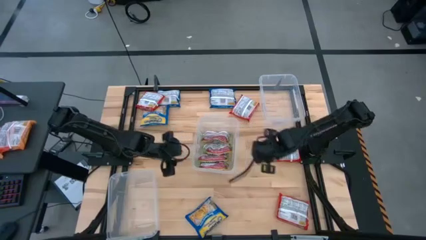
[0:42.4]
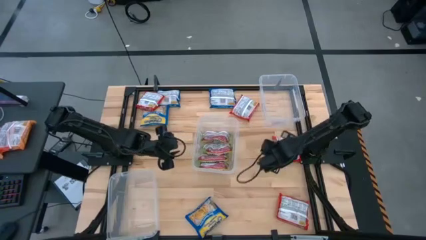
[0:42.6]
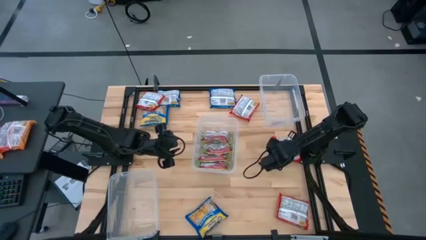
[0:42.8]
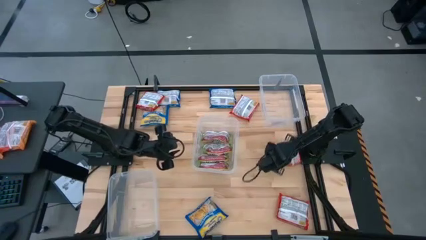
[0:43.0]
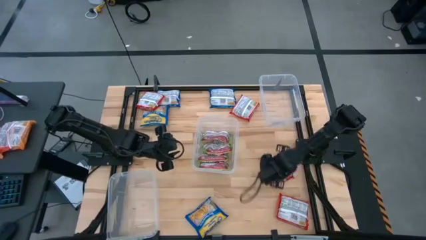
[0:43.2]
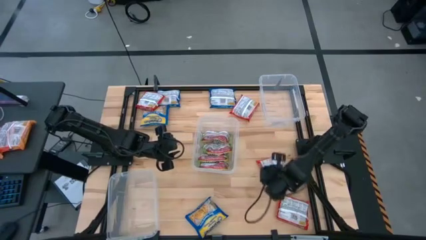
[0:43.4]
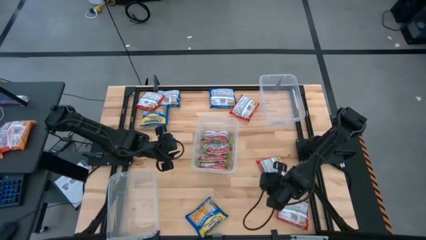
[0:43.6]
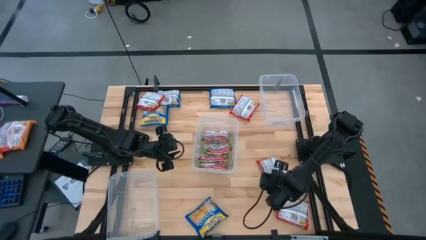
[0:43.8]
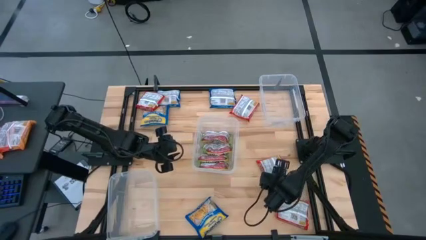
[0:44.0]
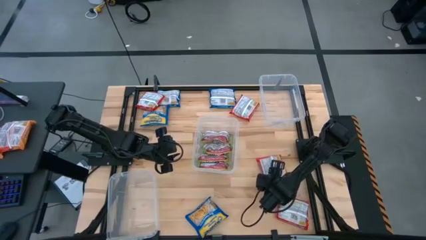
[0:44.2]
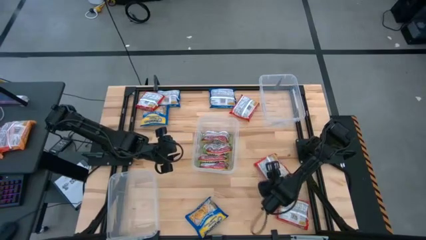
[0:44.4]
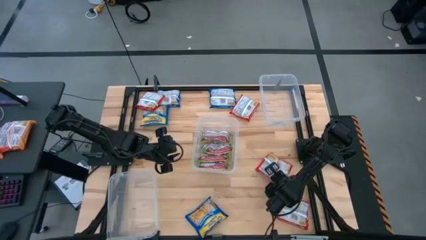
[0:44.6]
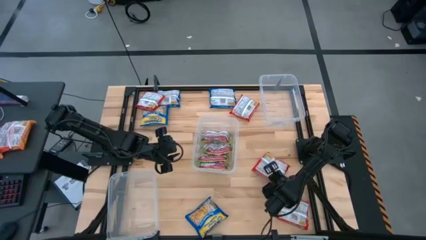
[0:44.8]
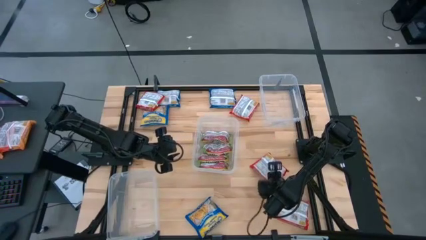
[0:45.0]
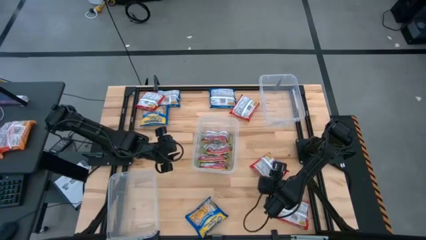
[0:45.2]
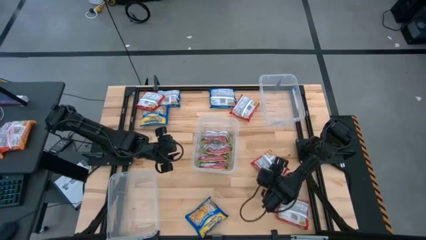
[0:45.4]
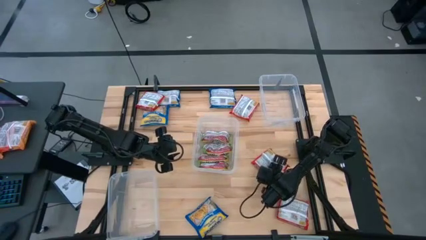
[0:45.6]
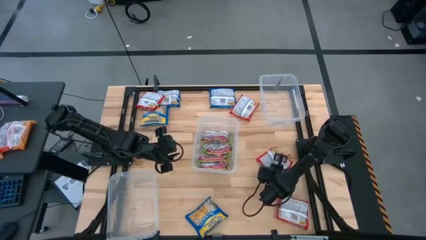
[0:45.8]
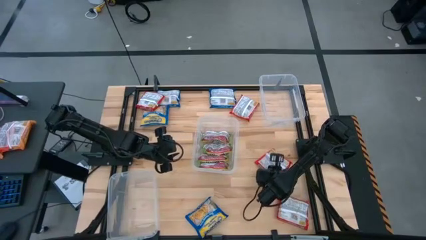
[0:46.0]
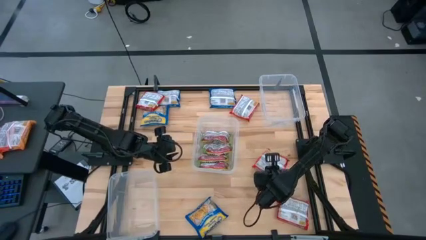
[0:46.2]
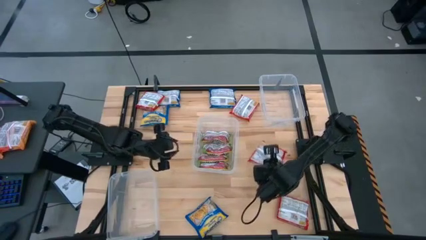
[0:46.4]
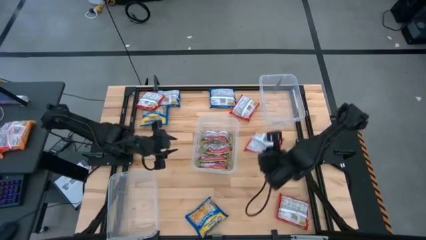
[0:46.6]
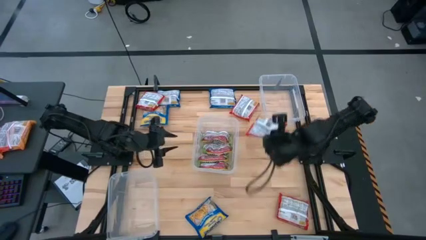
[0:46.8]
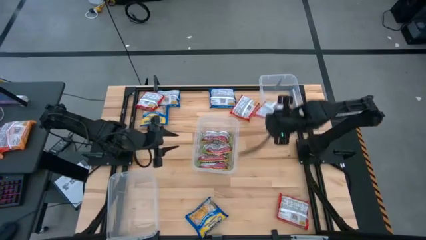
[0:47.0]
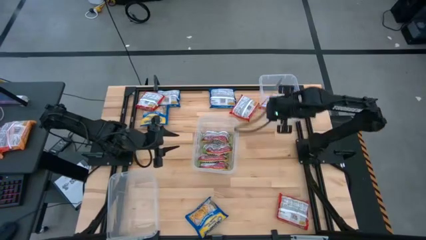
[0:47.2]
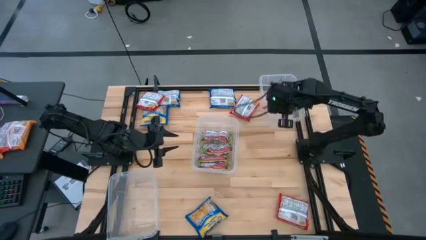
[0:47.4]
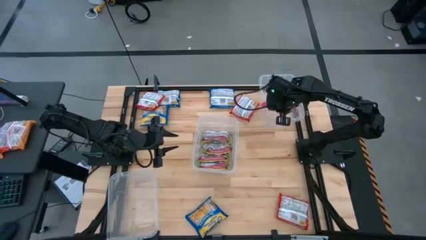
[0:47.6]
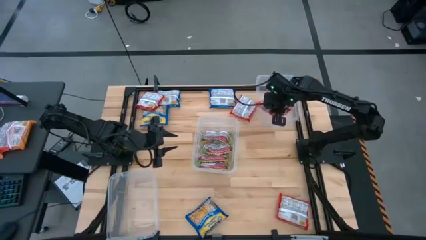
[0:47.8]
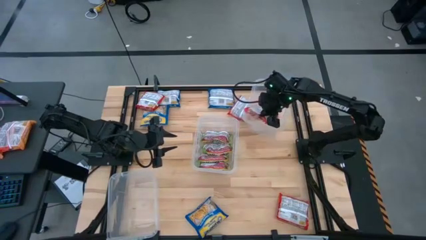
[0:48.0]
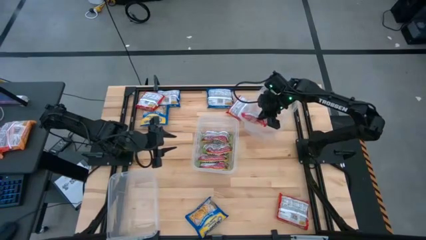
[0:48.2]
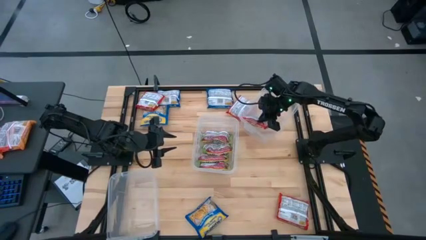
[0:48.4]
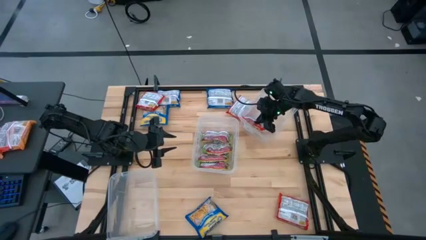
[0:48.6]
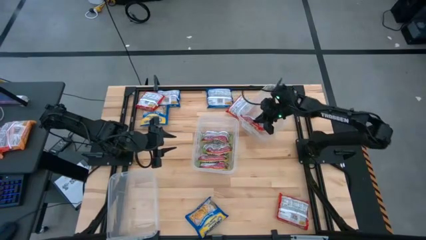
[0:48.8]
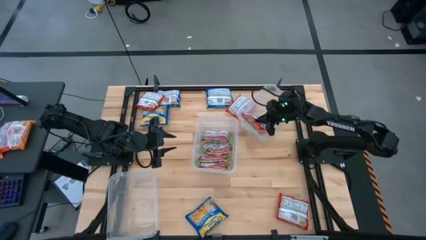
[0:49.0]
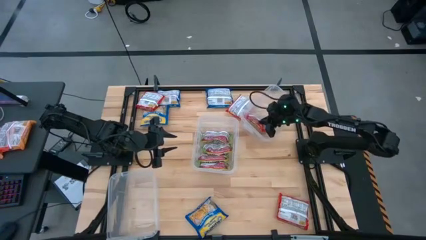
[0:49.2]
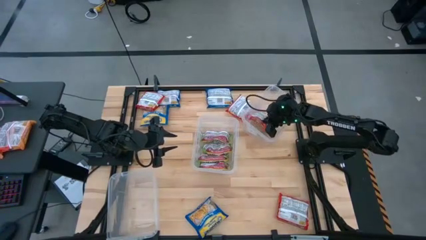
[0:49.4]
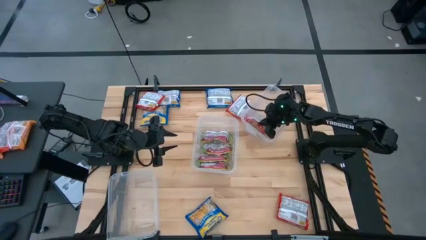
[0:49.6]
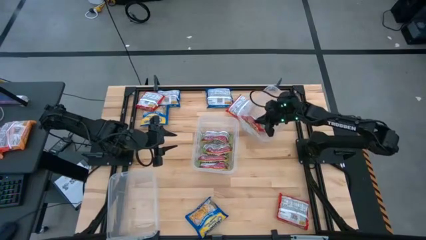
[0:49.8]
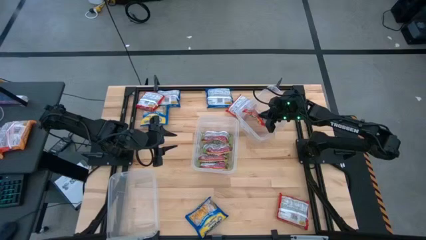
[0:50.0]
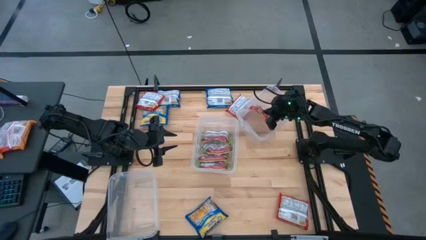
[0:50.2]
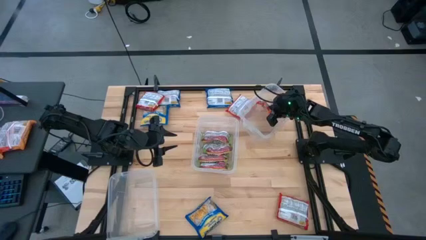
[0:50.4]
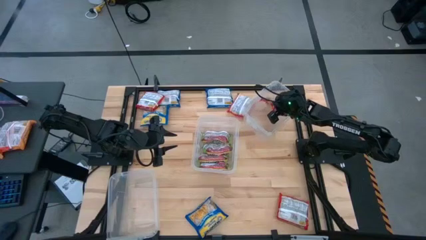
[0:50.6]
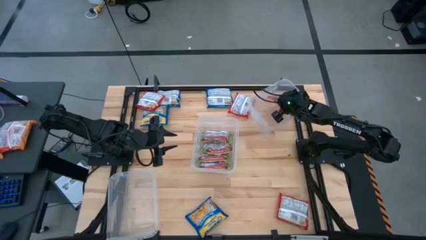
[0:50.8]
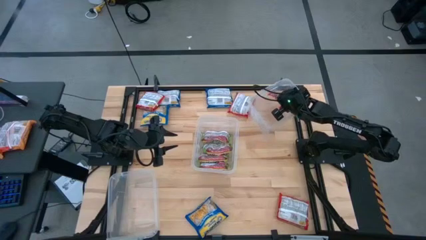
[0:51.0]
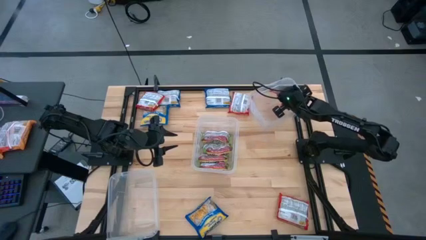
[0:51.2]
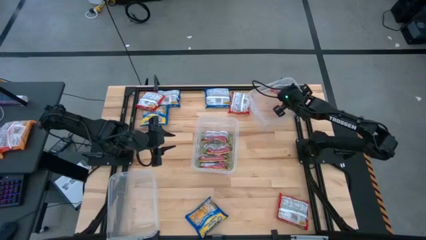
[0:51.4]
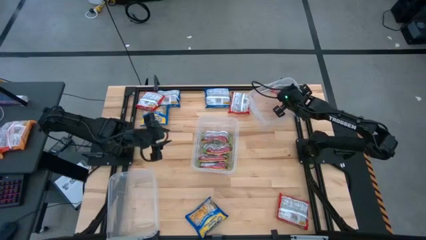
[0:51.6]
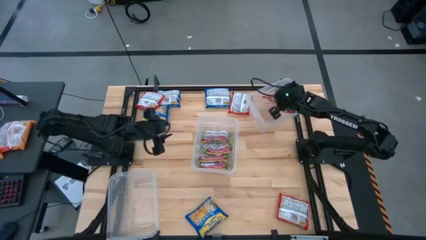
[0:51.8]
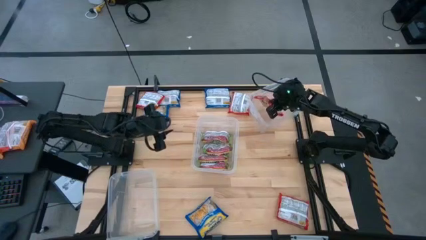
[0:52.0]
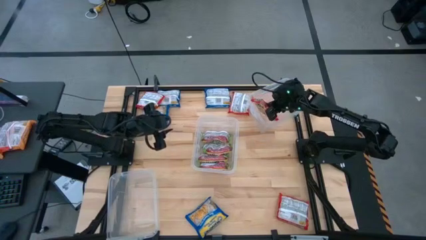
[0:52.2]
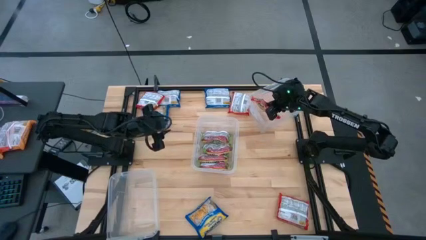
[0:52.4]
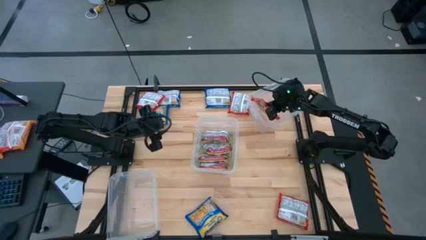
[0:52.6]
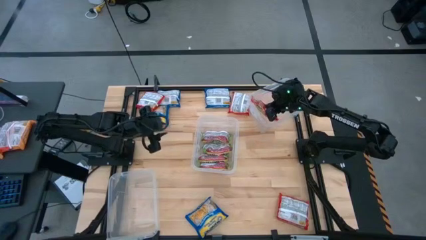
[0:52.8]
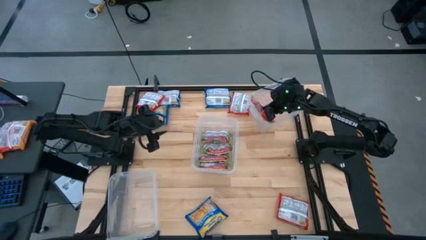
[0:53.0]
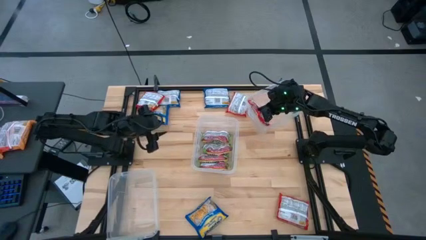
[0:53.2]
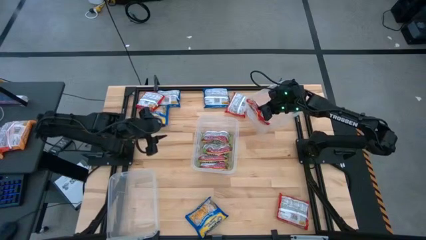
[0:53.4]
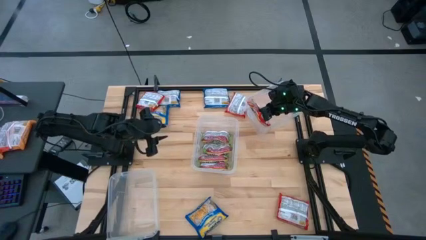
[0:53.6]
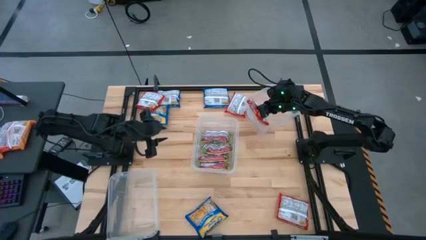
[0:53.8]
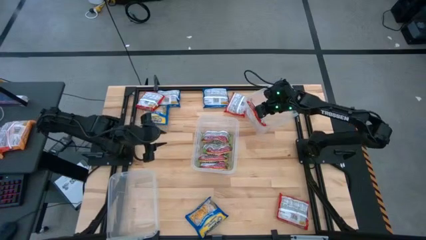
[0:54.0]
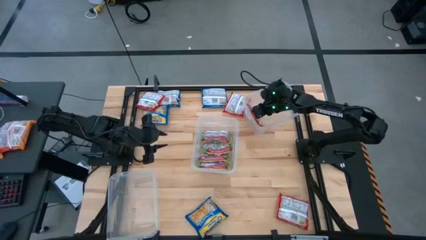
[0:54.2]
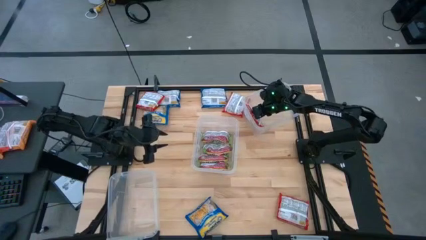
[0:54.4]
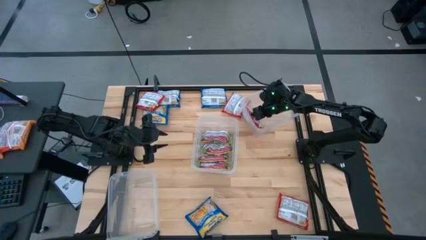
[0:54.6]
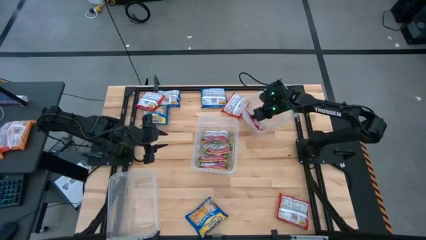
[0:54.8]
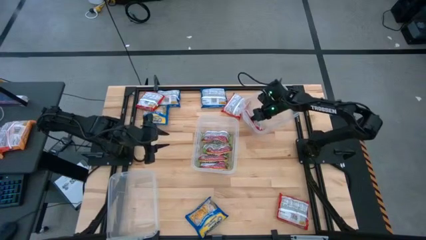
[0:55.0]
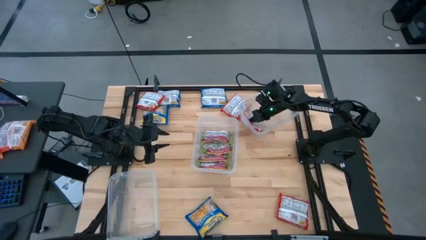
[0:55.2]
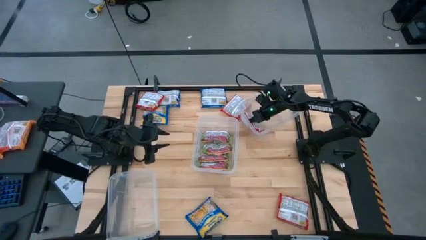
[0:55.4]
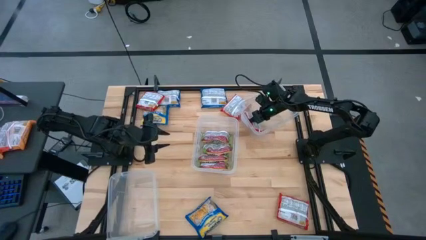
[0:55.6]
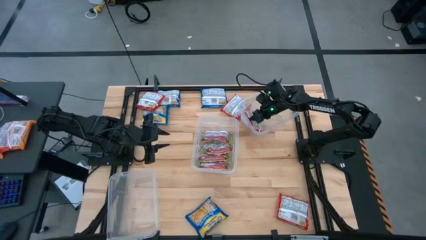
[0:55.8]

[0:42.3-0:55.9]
Task: Sort Maruchan noodles
Put the red noodle pack into the top transparent container
